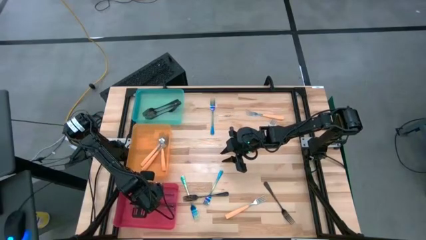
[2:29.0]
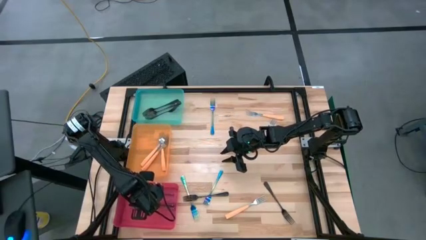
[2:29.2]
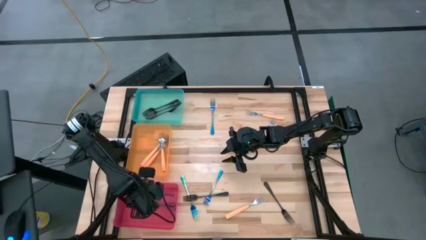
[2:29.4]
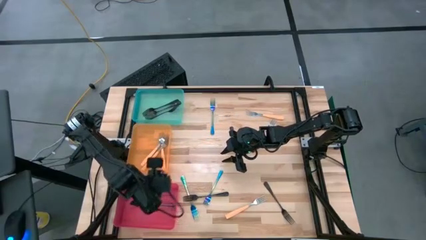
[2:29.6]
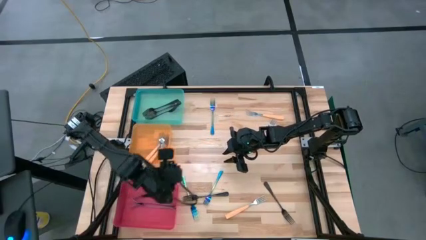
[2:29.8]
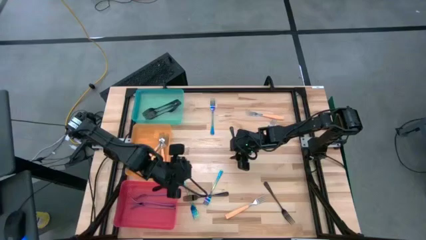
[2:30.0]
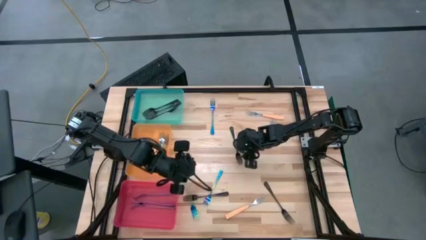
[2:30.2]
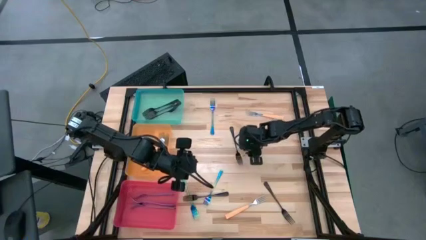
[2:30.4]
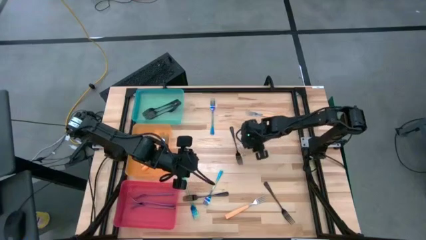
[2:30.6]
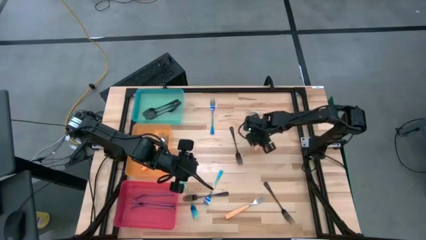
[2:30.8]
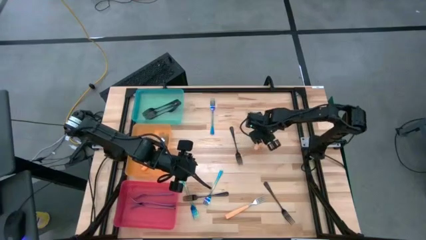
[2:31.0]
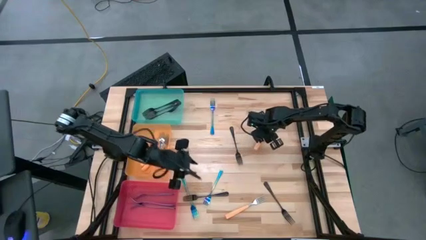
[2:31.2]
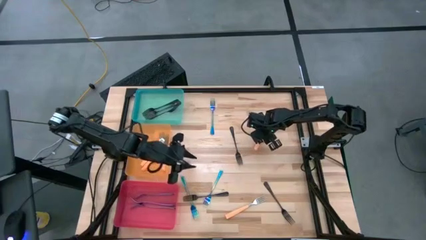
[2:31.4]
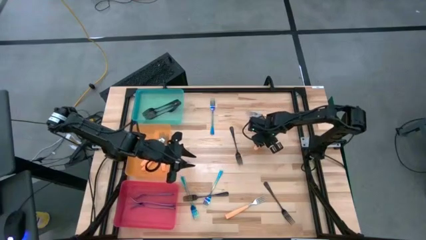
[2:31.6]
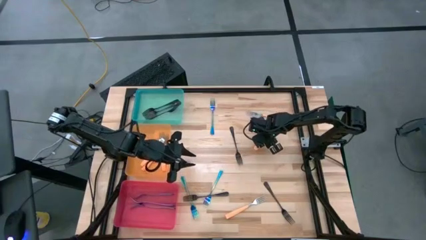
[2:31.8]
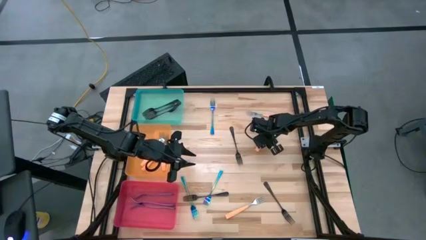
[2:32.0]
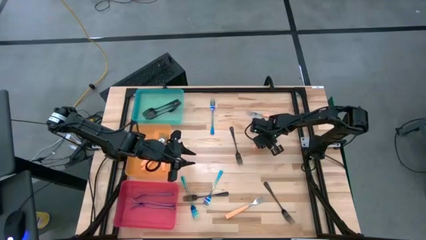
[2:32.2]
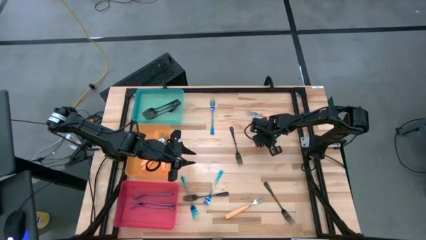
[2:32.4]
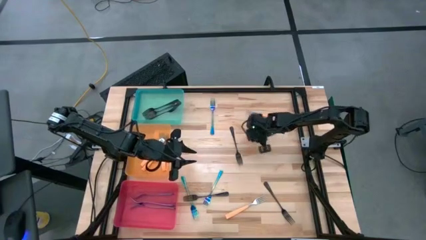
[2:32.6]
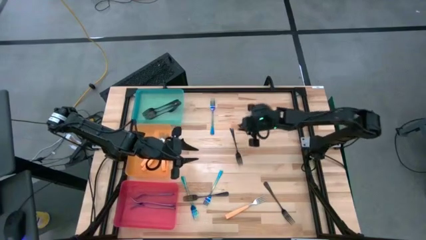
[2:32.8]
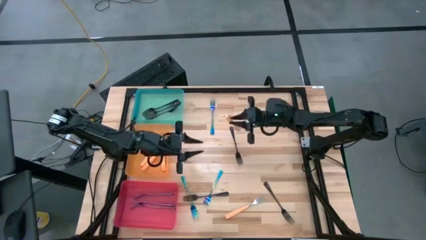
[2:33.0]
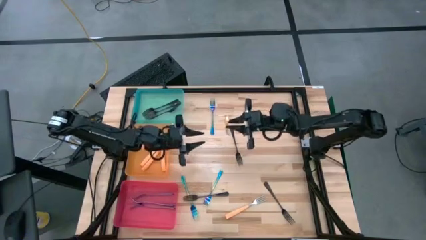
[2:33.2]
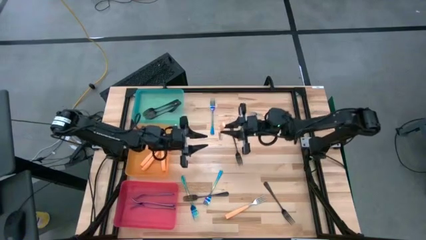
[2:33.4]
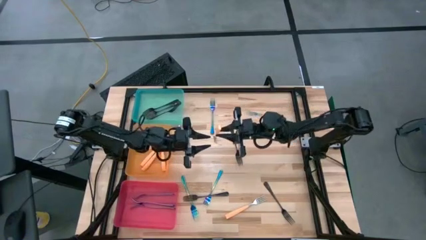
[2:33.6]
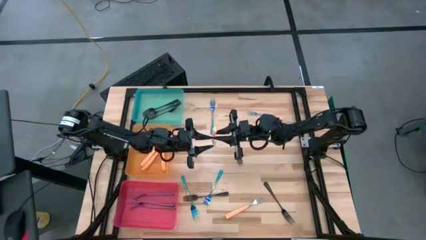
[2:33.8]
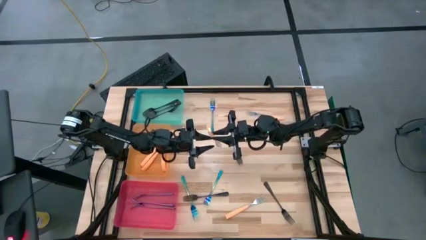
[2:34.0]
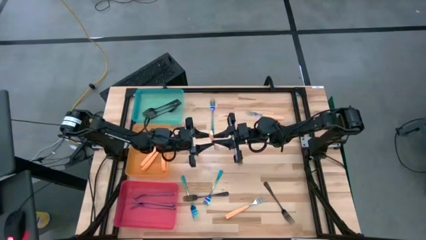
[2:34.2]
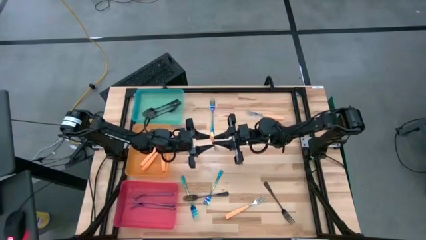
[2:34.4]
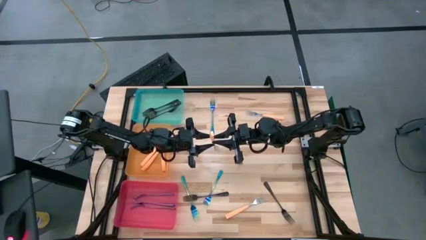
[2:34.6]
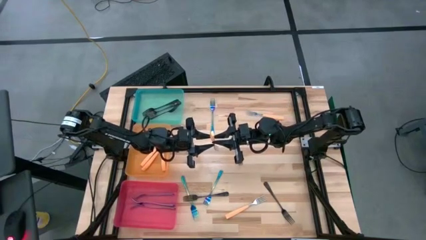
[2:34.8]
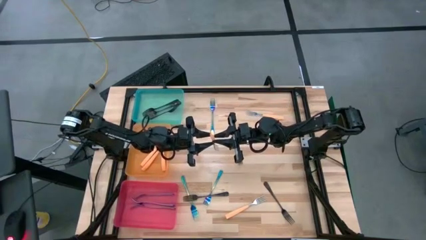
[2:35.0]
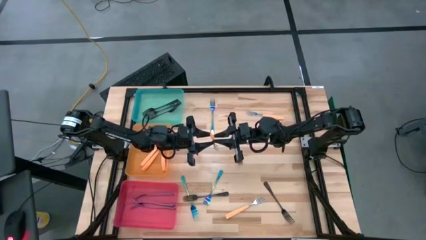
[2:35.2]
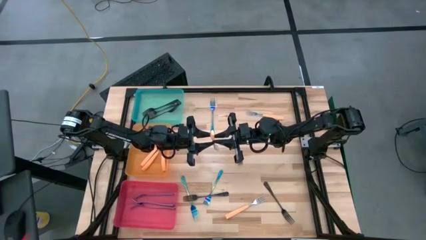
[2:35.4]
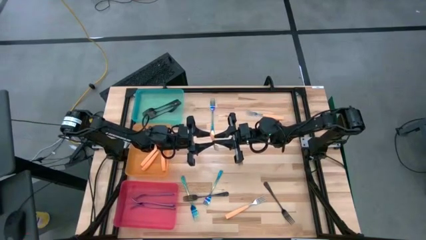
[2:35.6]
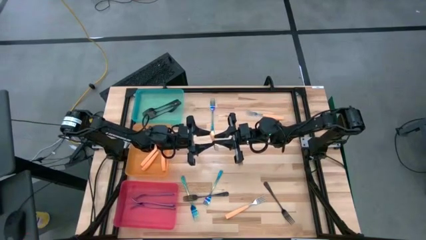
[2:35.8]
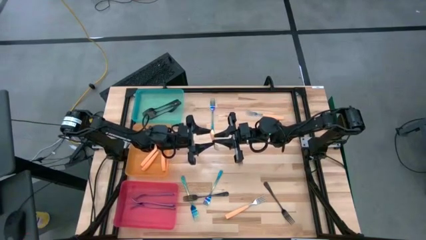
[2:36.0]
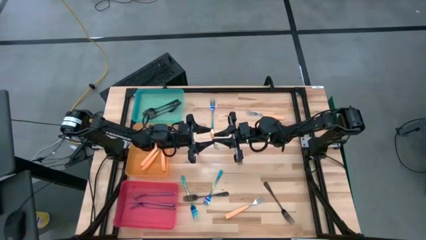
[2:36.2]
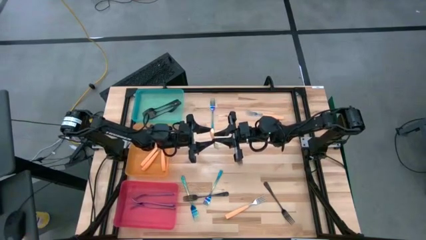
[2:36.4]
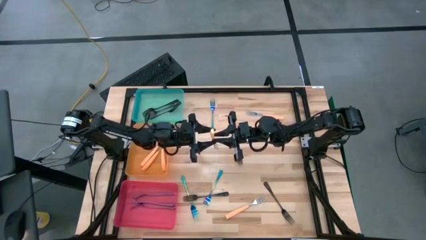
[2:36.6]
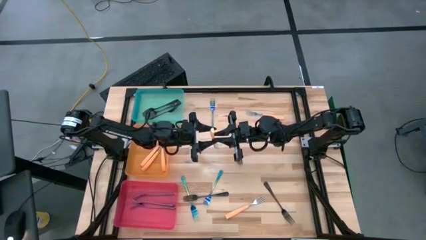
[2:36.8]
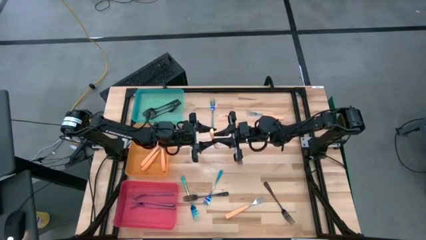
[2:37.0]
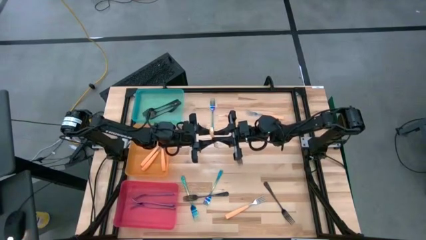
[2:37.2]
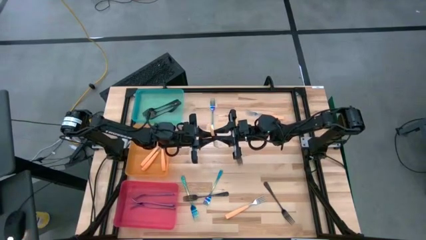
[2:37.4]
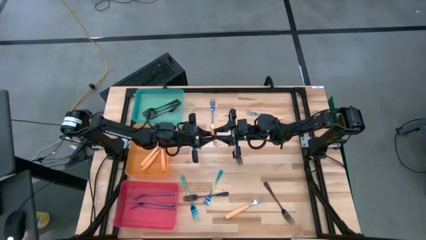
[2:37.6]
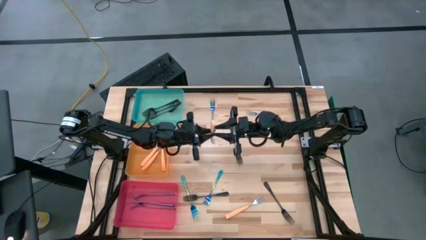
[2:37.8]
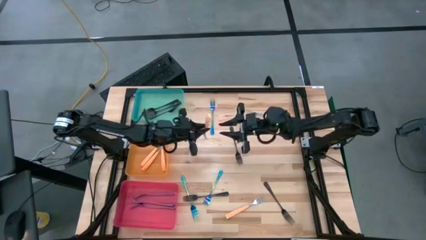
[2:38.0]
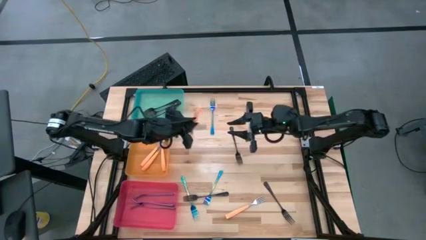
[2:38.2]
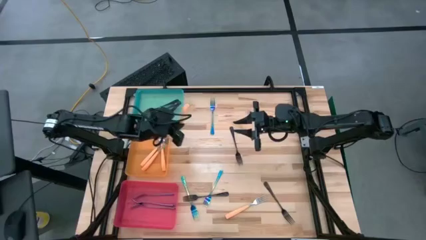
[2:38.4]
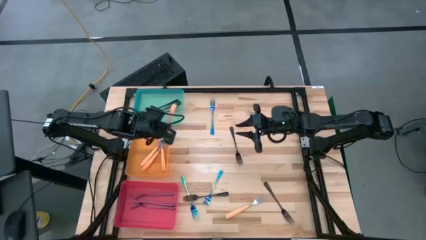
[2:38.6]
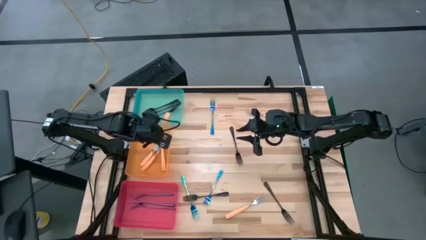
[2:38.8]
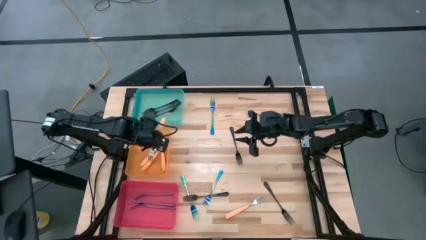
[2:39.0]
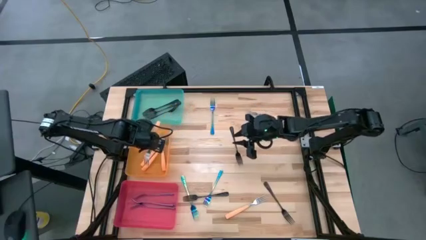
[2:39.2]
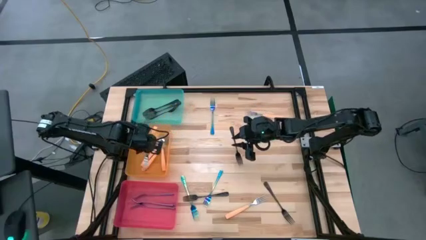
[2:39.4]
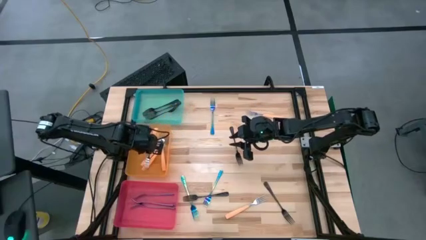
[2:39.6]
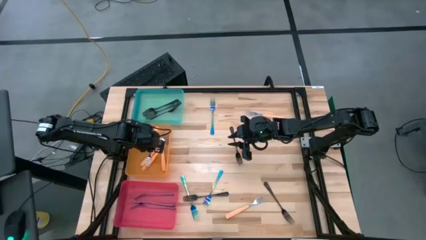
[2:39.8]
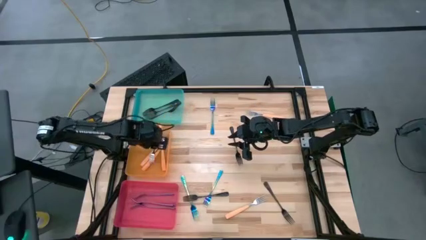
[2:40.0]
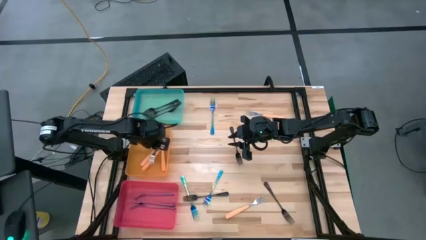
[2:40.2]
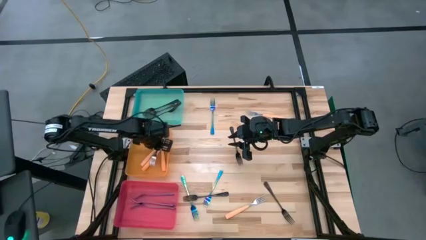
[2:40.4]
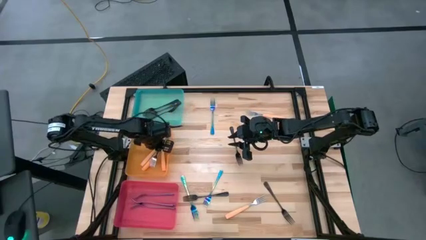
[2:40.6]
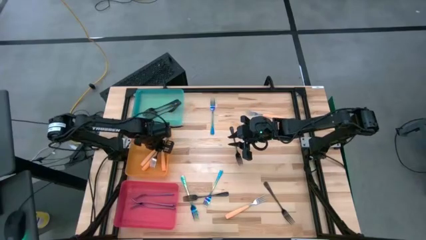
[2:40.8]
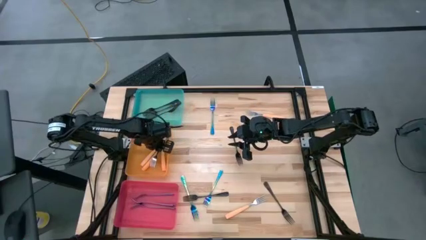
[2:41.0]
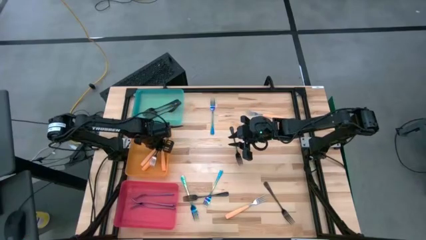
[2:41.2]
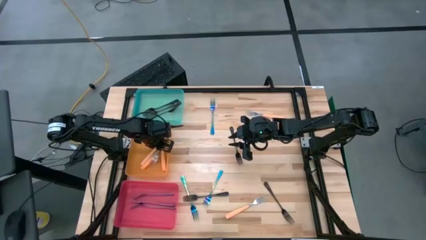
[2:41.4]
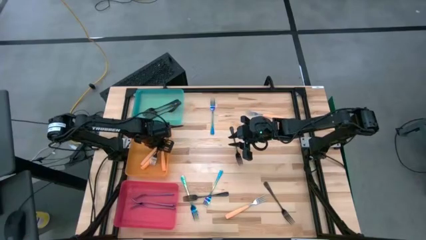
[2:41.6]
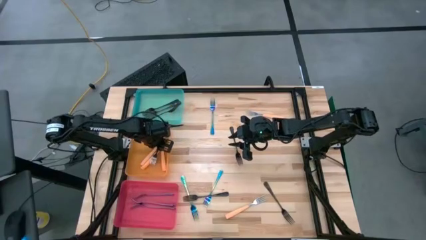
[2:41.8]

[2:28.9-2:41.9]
Task: Sort silverware by color (type)
Put the orange fork into the orange bin

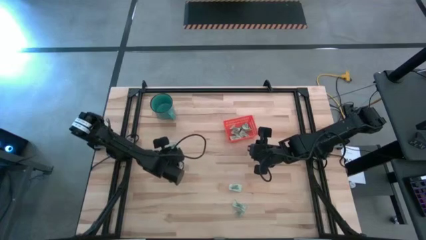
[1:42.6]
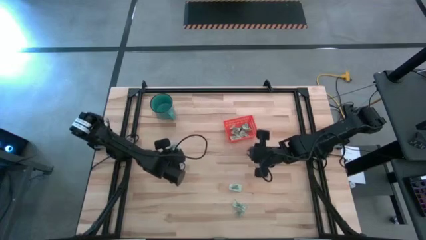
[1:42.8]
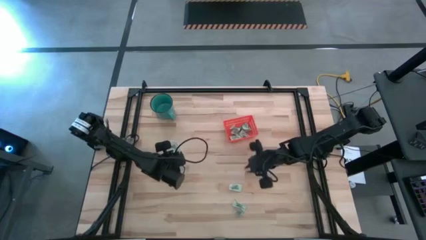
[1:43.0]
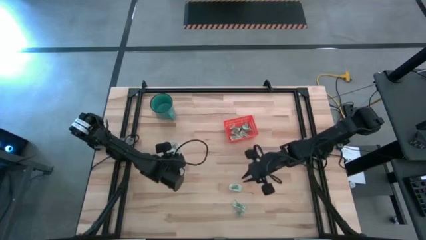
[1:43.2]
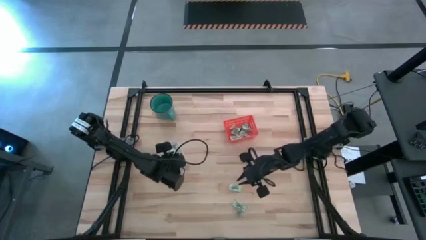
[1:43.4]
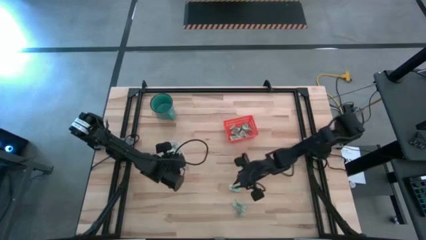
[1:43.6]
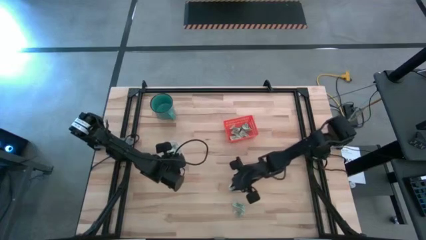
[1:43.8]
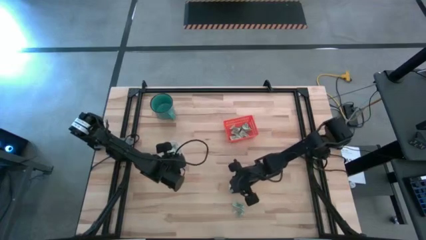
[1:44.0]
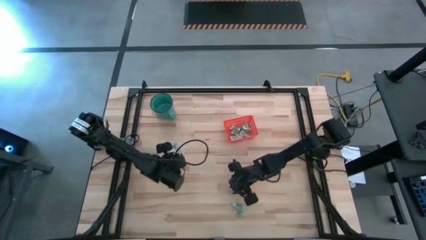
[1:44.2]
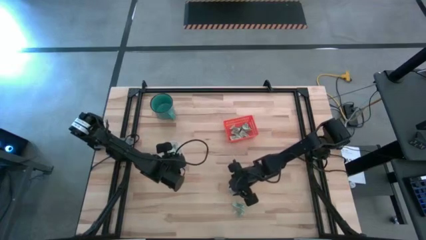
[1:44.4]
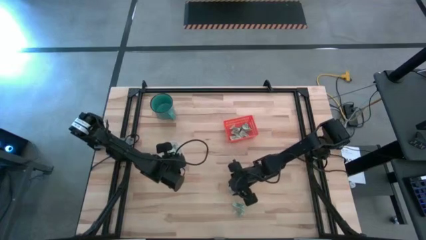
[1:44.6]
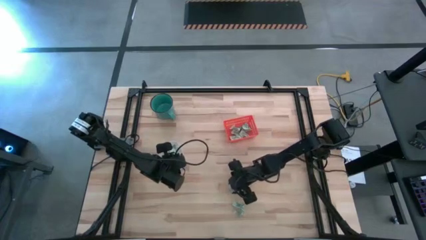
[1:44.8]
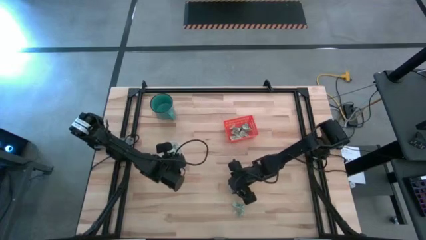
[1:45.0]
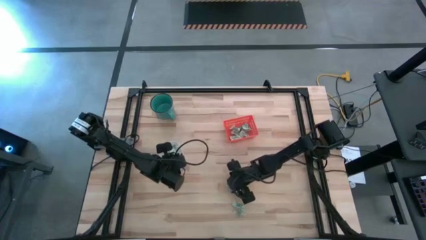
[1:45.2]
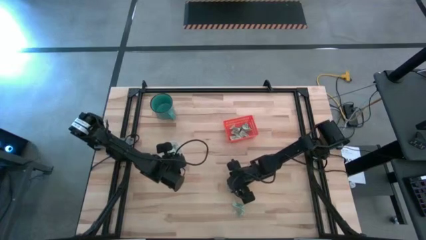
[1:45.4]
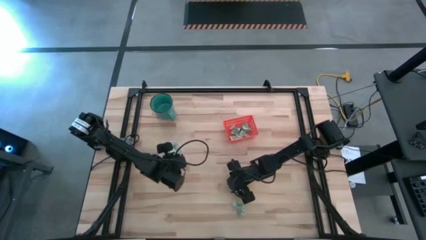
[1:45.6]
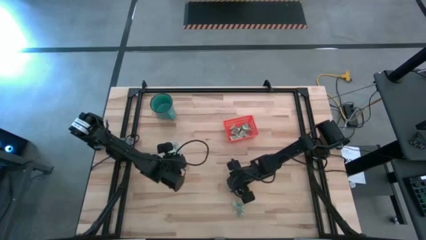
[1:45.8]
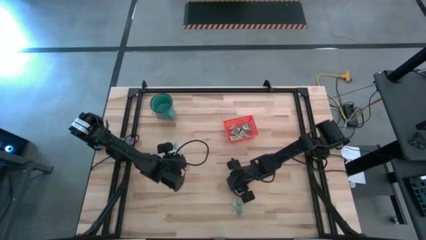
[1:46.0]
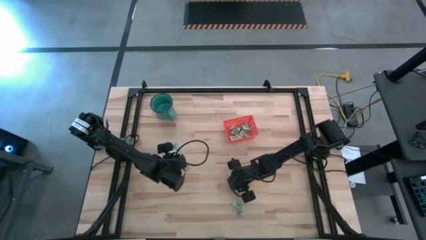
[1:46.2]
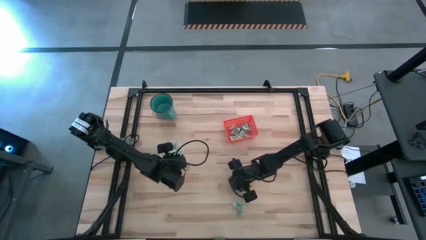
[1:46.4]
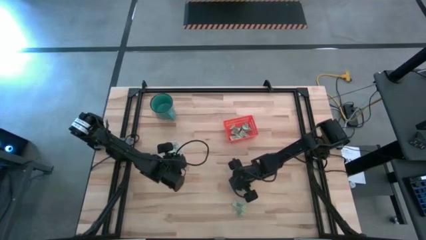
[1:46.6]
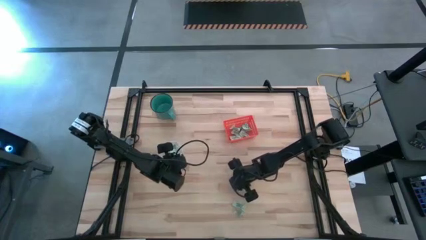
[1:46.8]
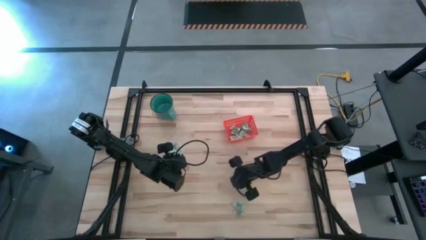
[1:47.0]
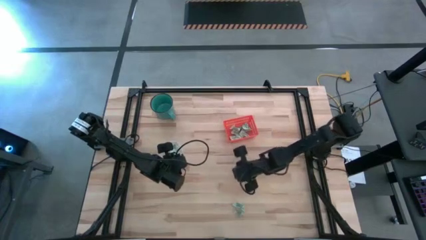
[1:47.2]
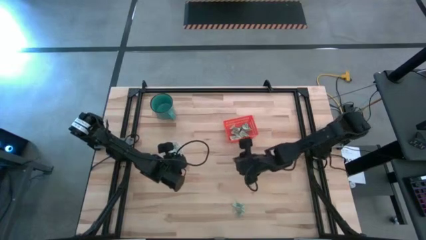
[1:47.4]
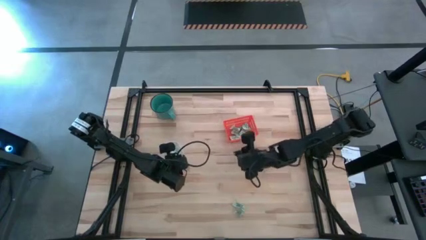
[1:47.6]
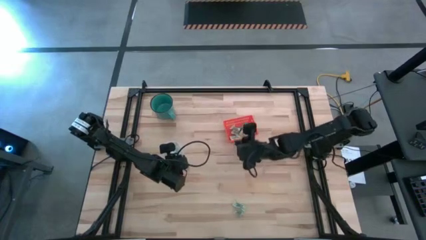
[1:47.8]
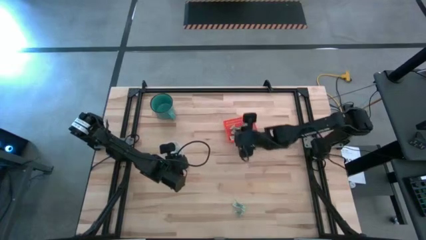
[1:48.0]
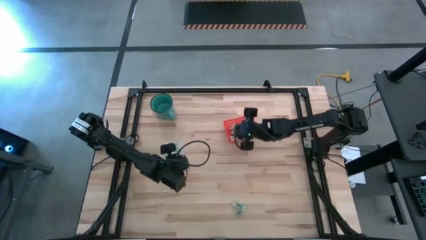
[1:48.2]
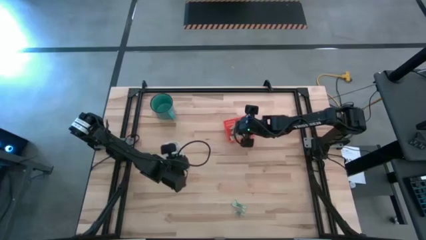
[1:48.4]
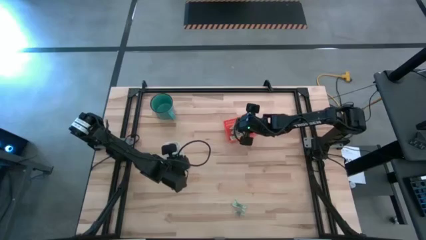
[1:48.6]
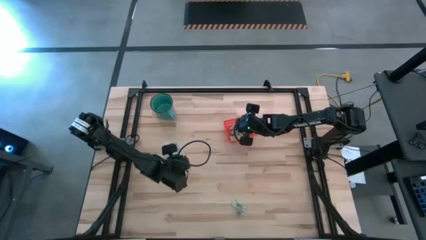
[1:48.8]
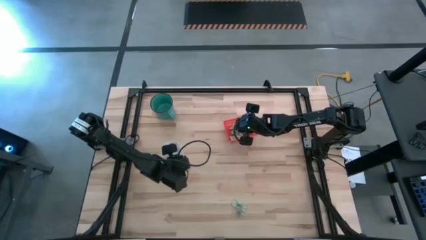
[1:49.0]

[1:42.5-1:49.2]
Task: Pick and place items into bin
Put the light green stevia packet into the orange bin
